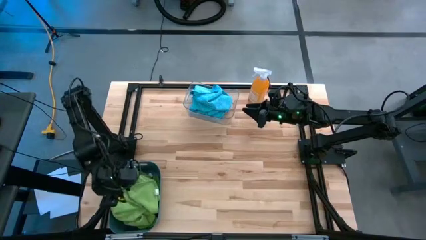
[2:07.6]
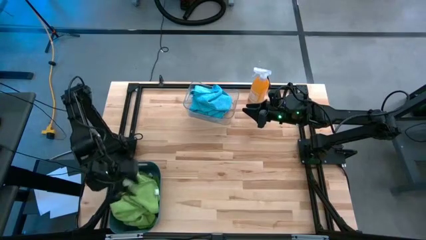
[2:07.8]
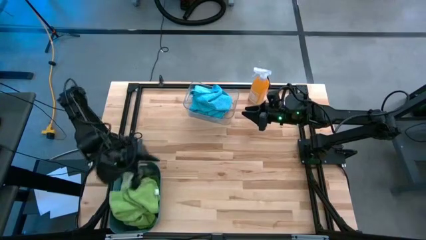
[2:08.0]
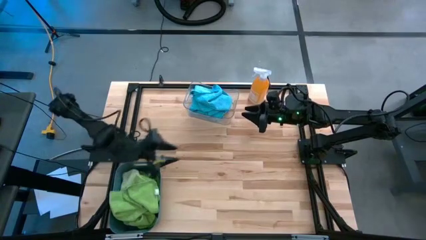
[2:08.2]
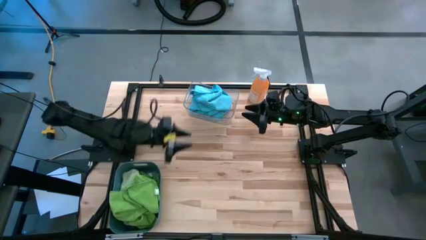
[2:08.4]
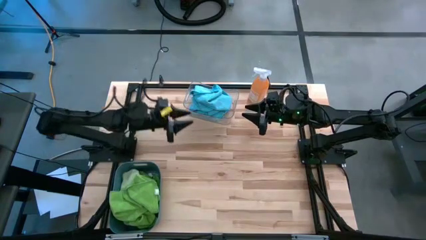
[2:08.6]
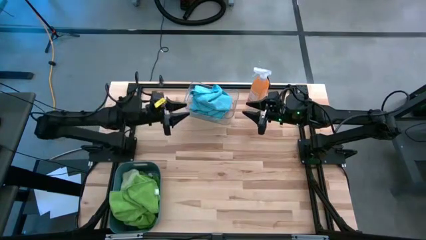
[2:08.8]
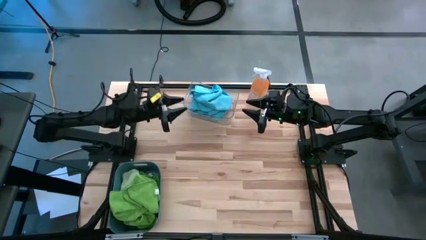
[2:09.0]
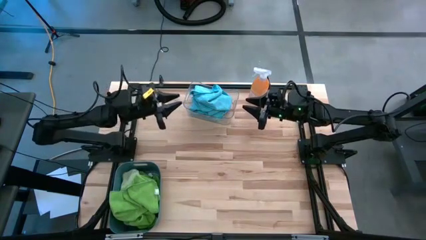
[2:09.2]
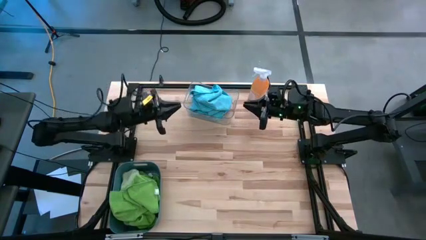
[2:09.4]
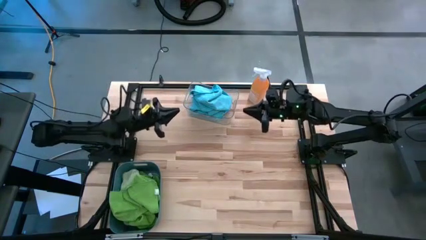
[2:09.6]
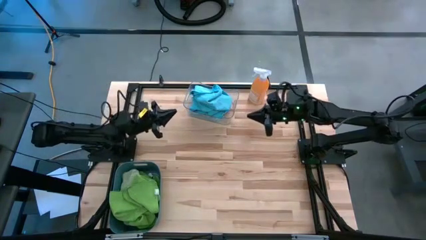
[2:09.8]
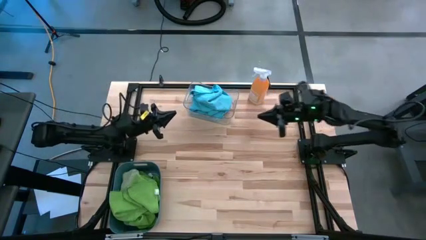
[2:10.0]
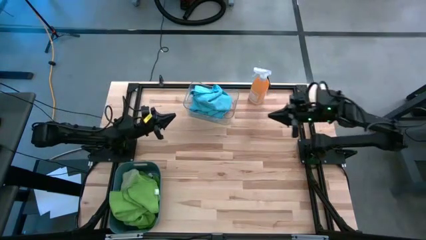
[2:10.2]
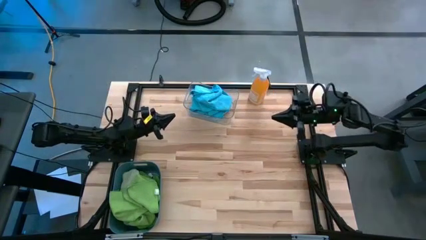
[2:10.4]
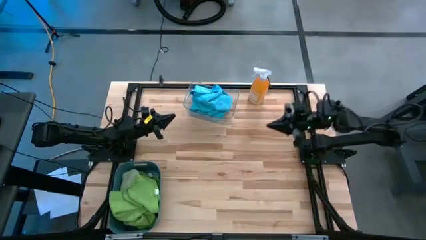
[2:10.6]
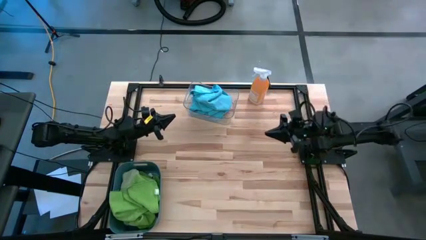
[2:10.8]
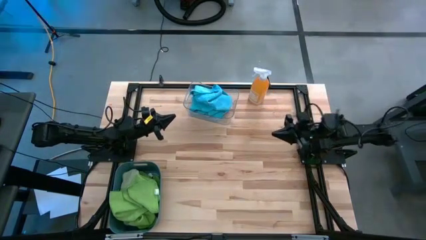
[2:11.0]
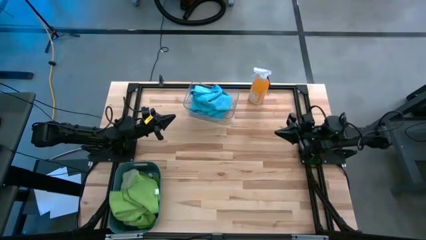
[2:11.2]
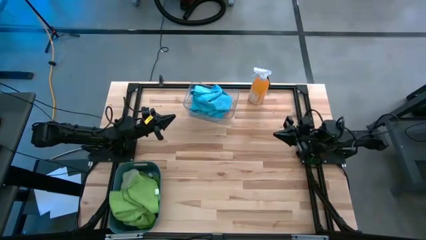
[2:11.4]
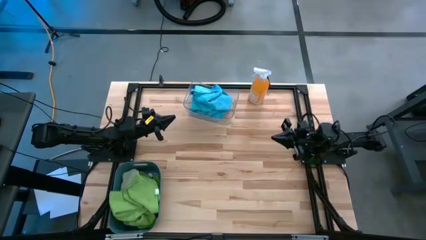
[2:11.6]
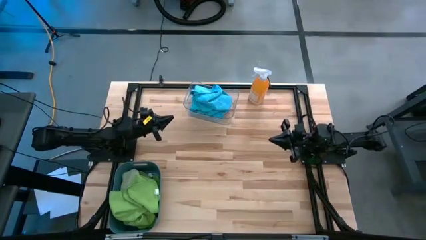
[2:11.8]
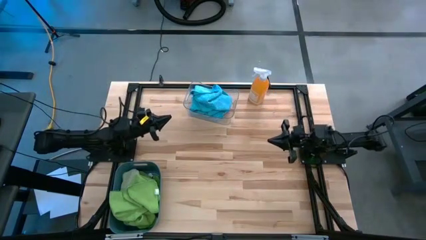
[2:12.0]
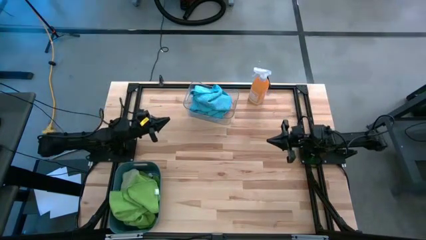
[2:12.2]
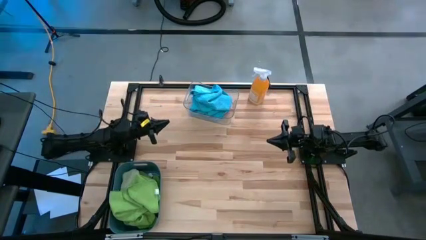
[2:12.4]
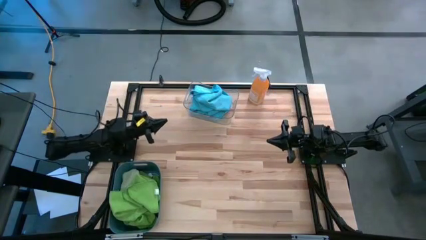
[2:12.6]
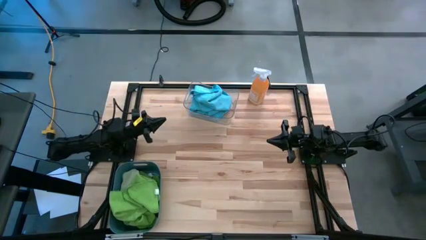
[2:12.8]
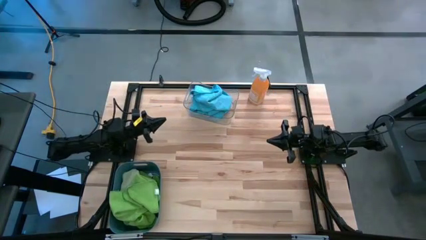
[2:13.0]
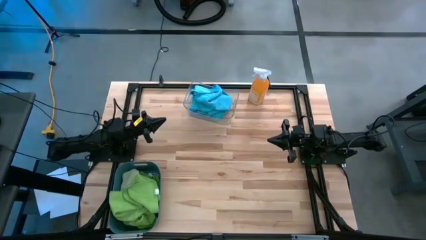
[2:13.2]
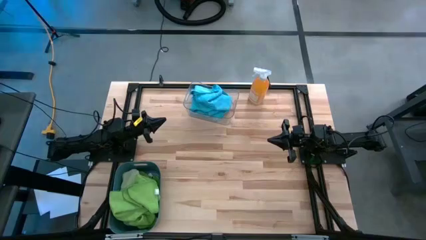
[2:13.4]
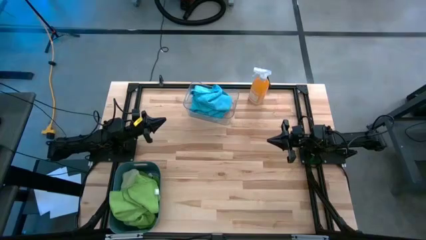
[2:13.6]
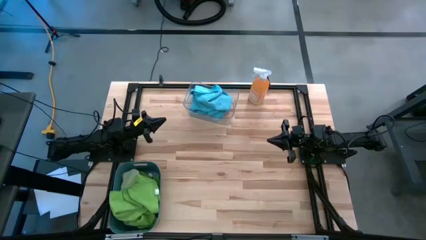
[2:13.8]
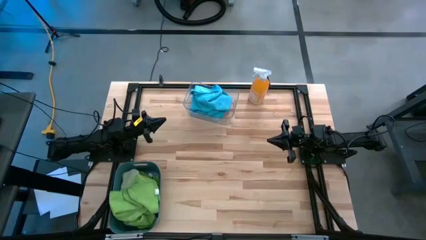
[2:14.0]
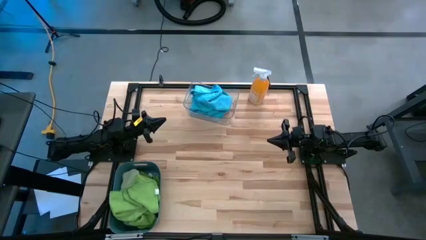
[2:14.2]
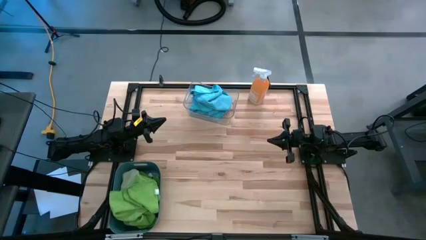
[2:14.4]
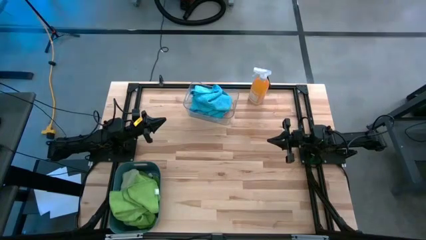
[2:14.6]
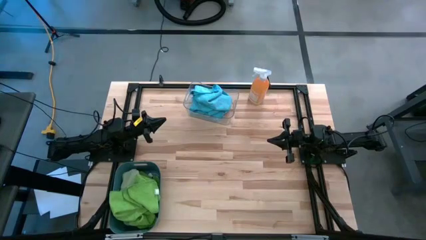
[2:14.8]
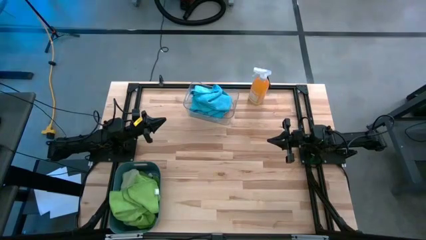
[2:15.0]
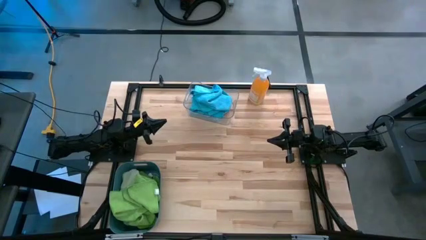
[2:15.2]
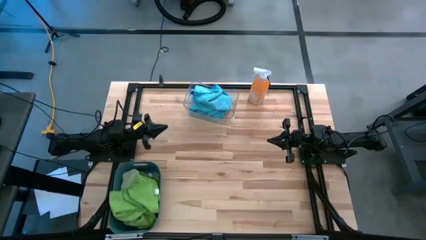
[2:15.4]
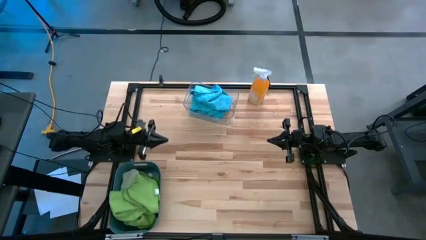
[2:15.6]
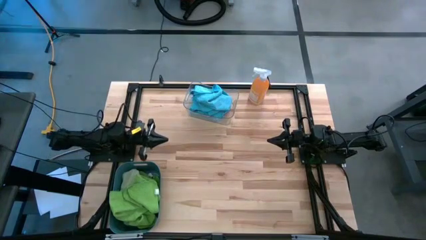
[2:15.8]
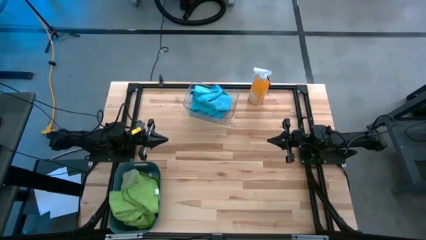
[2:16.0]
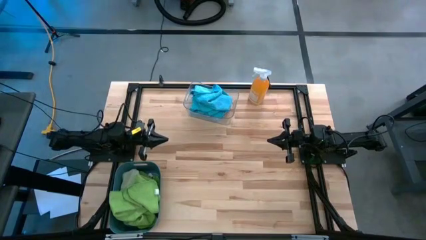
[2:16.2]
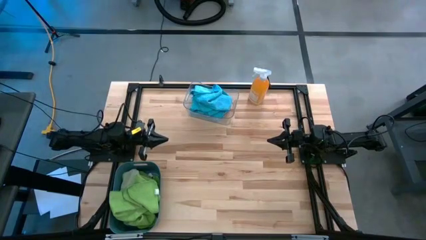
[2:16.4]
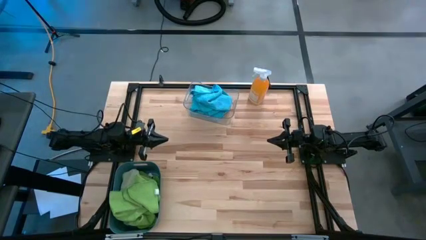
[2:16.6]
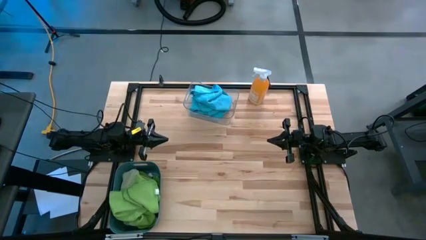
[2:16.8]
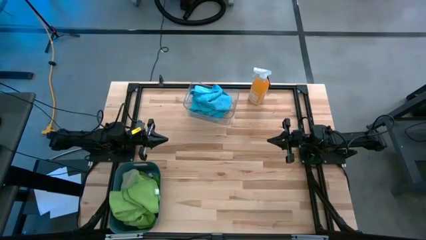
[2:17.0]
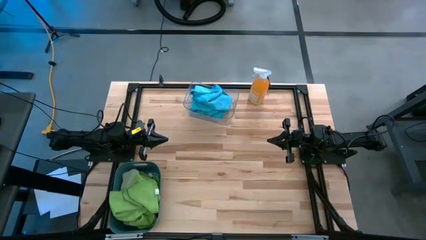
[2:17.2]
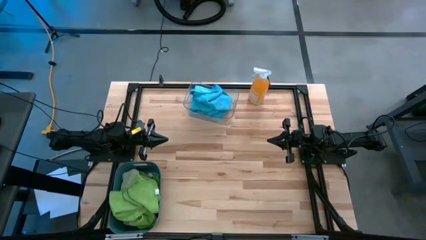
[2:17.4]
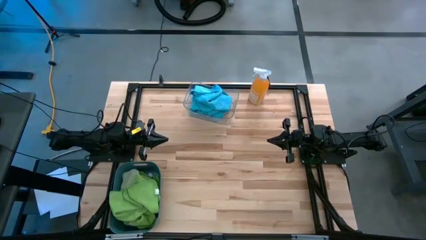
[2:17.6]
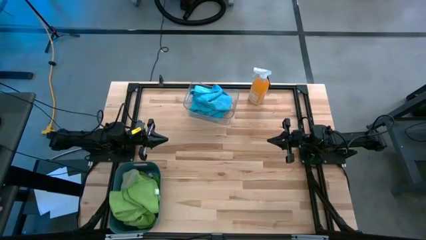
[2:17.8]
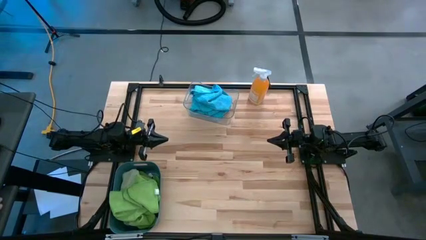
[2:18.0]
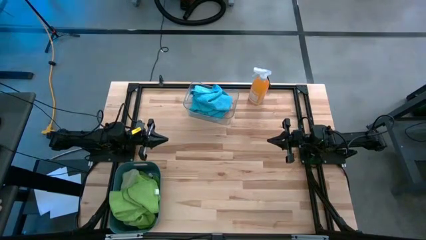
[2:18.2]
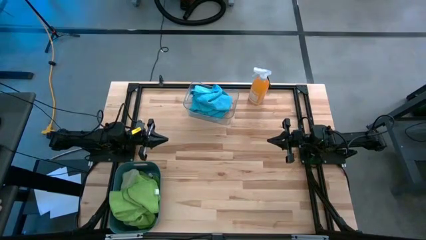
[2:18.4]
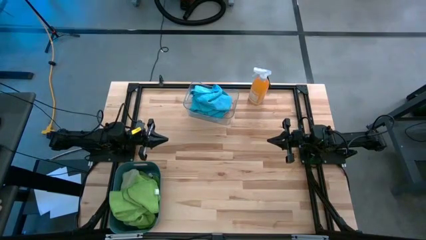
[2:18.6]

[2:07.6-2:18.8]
Task: Sort microfiber towel by color & place in baskets
Return to Home Position

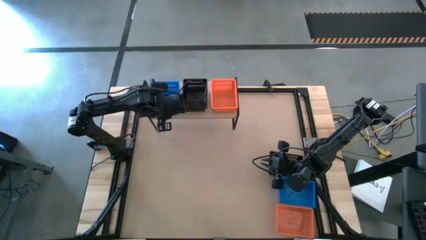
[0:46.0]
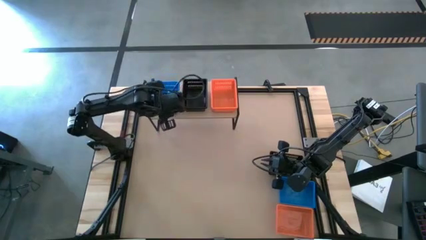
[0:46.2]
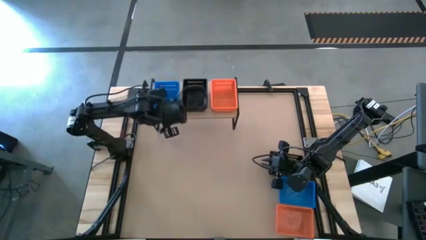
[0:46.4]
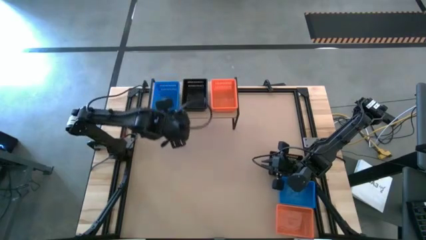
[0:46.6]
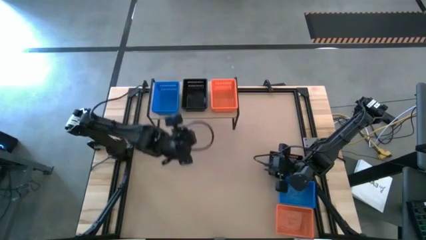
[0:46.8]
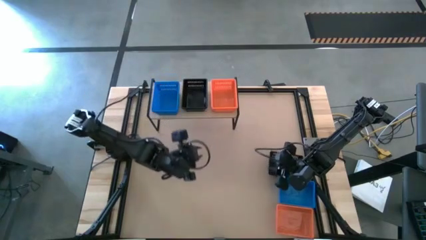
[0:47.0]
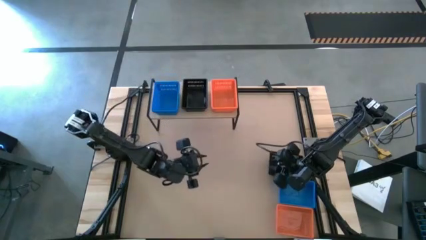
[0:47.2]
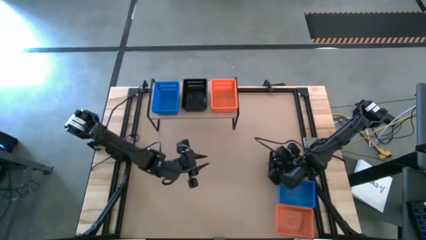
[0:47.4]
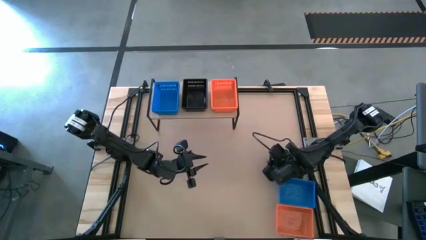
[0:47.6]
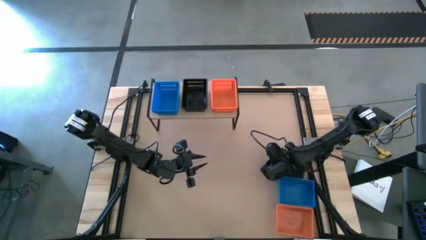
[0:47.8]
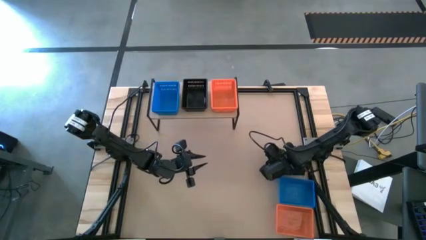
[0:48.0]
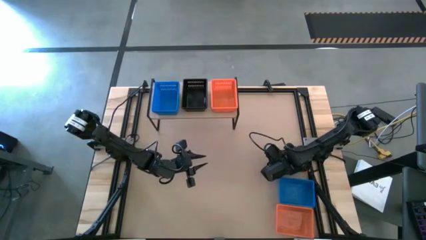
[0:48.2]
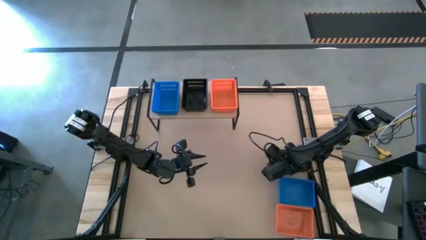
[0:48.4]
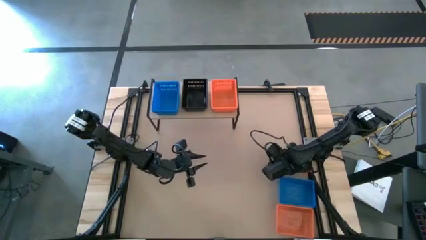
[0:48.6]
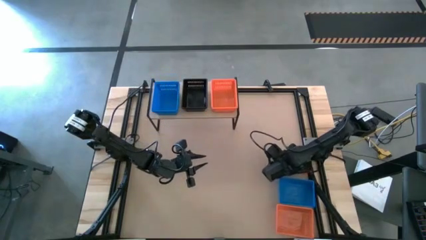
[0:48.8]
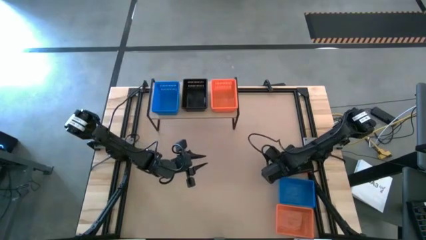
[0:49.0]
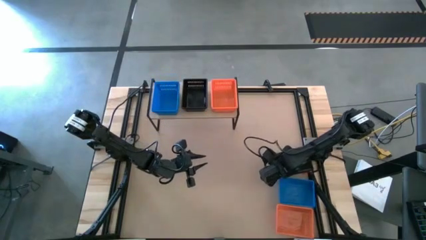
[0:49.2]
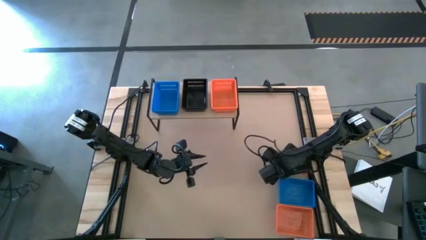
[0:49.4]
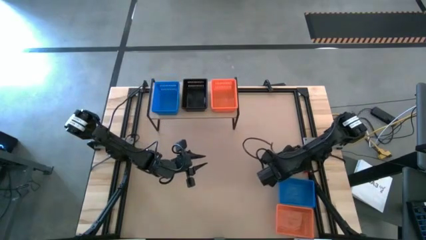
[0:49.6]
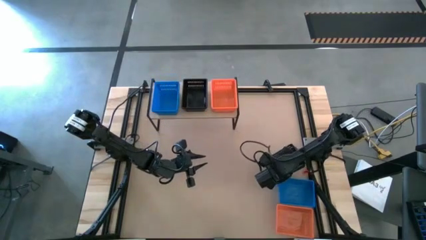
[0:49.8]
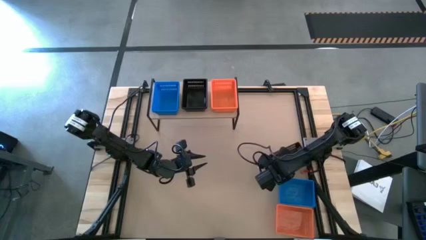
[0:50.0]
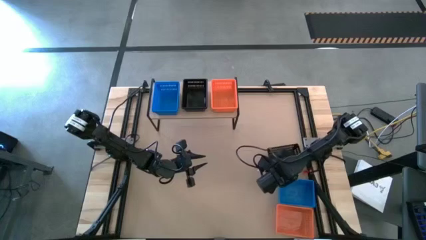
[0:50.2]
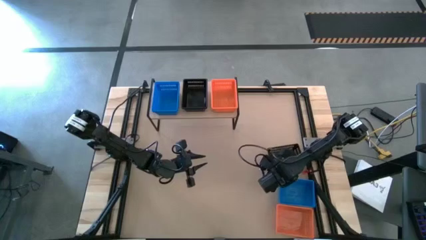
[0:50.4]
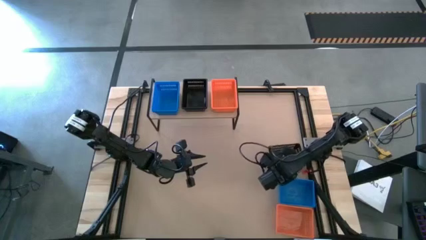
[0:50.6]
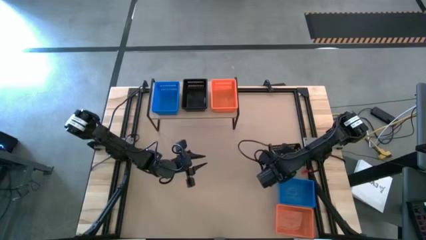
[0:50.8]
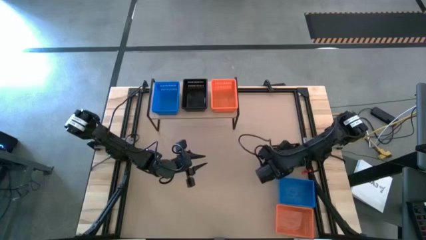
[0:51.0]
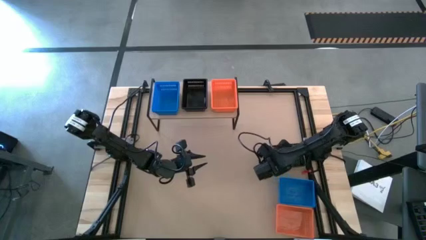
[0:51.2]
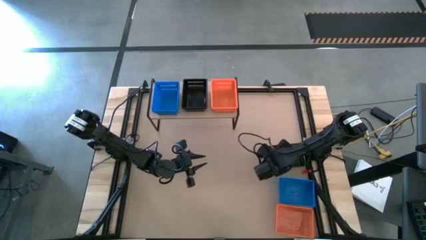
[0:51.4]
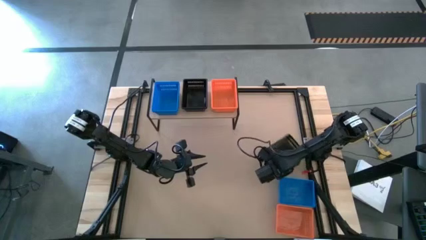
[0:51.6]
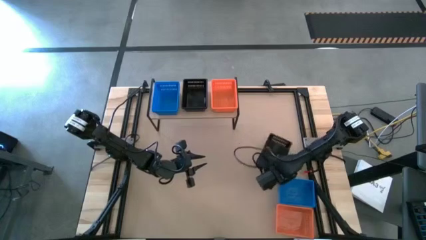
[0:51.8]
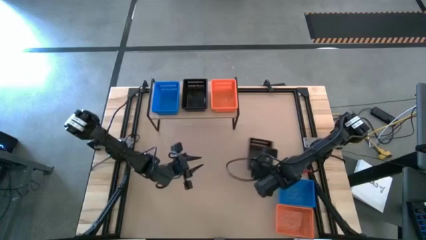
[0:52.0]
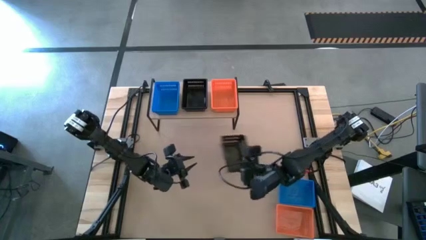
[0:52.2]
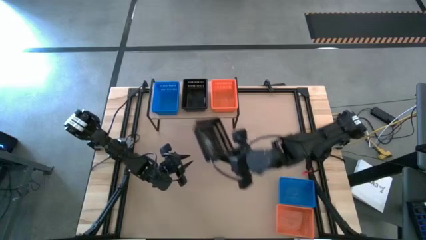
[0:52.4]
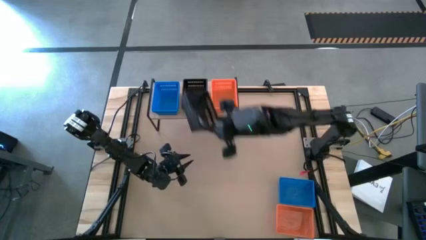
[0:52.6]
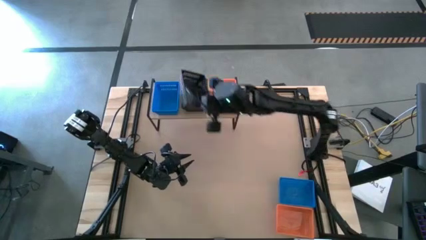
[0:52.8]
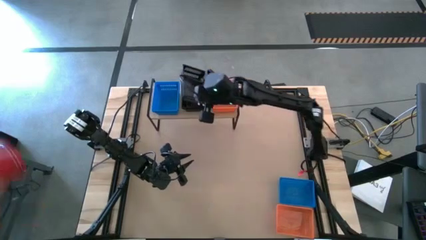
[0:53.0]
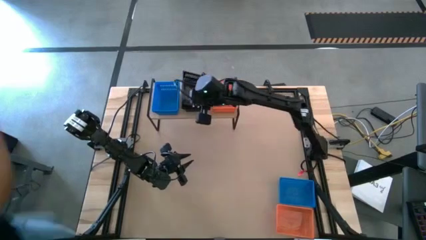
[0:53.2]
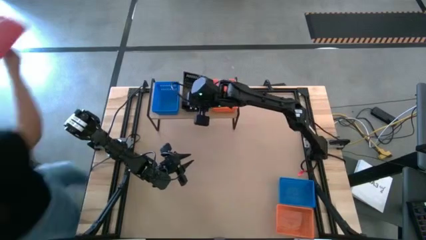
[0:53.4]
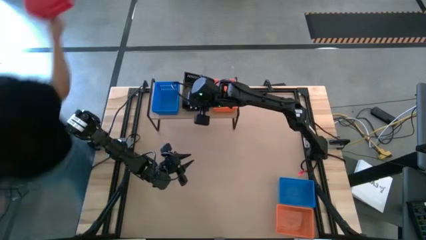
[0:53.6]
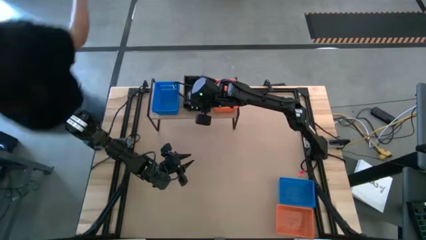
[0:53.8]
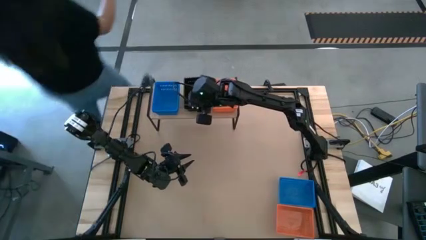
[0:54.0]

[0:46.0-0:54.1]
Task: Stack baskets on shelf by color
Stack the black basket on top of the black basket on the shelf
